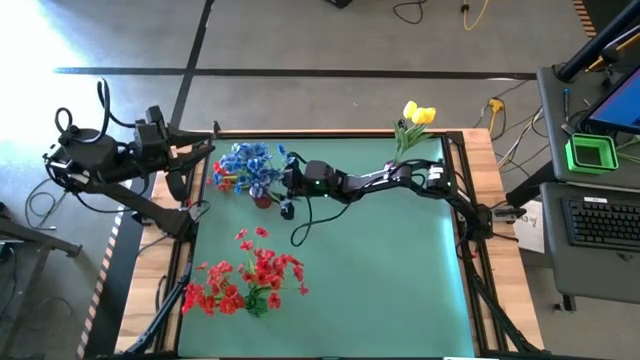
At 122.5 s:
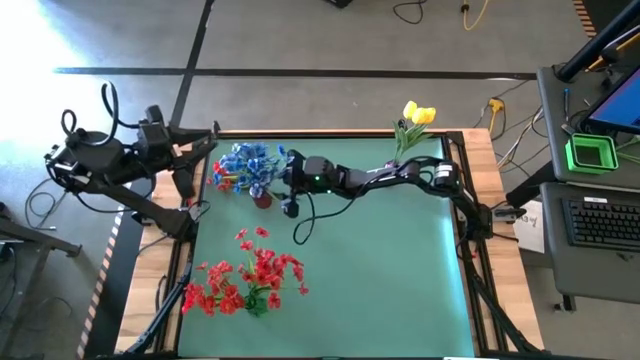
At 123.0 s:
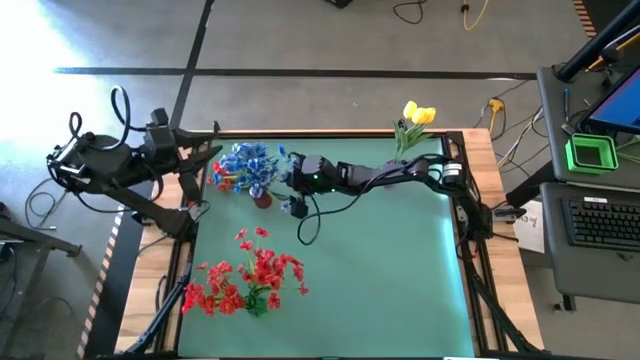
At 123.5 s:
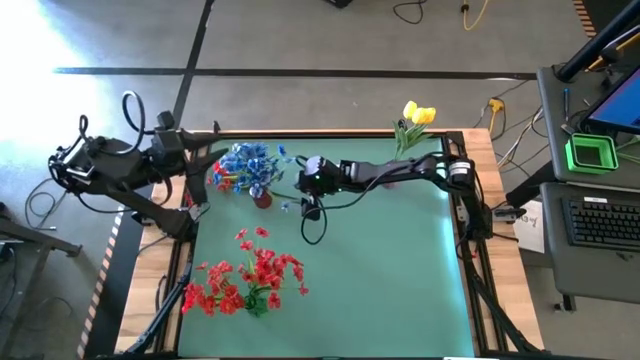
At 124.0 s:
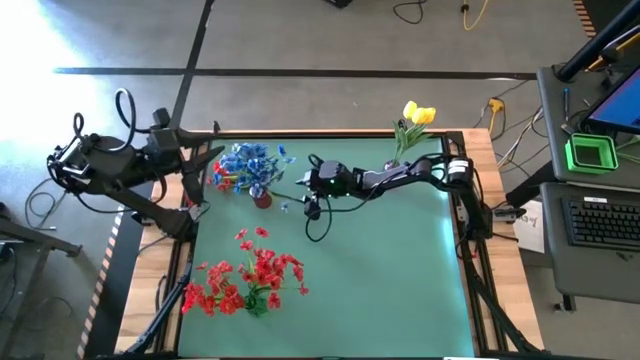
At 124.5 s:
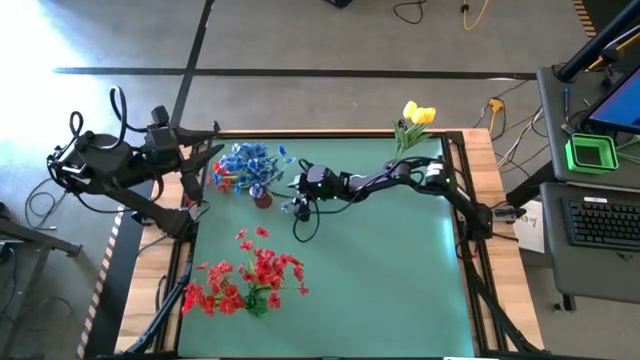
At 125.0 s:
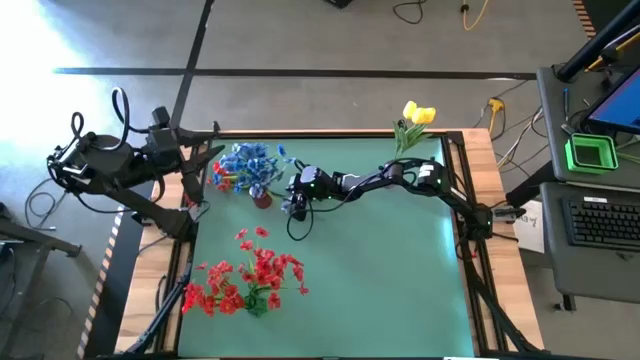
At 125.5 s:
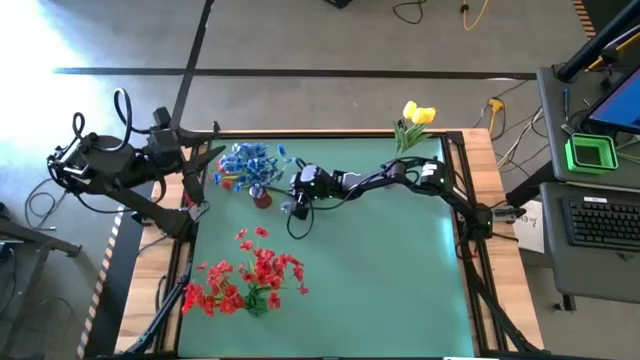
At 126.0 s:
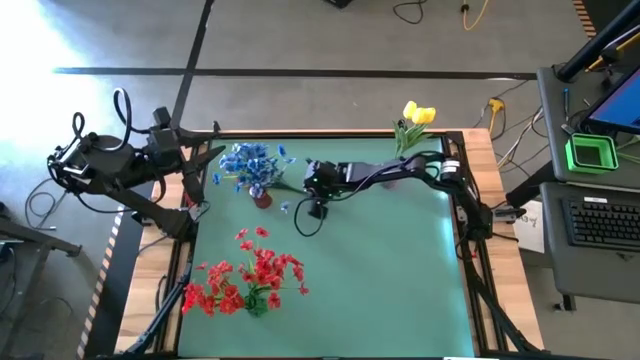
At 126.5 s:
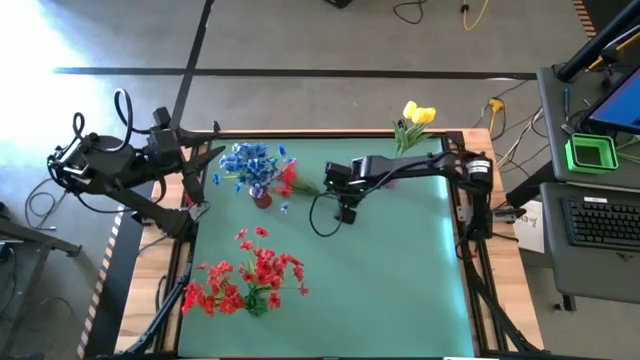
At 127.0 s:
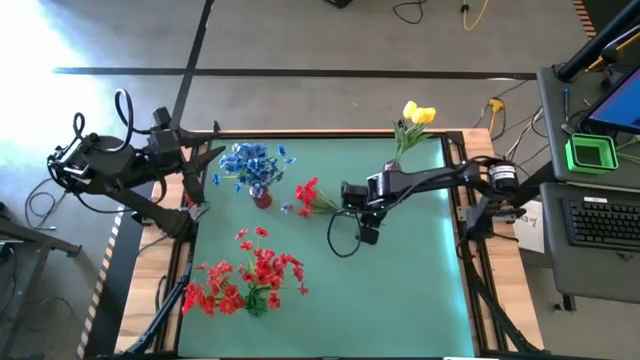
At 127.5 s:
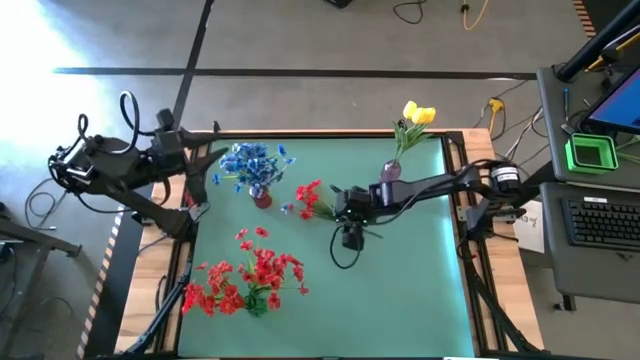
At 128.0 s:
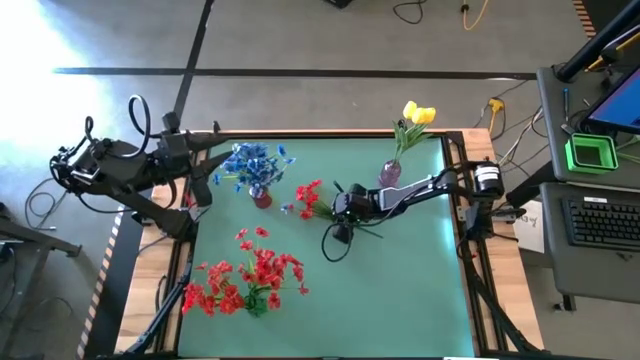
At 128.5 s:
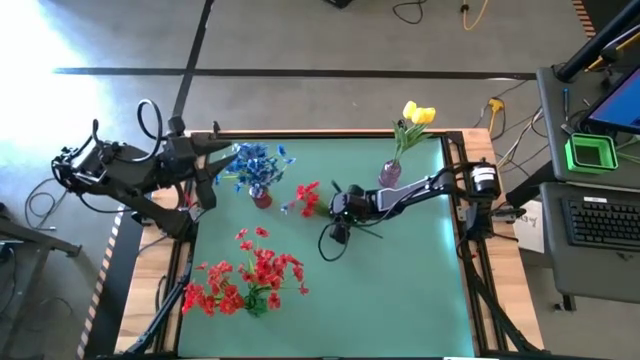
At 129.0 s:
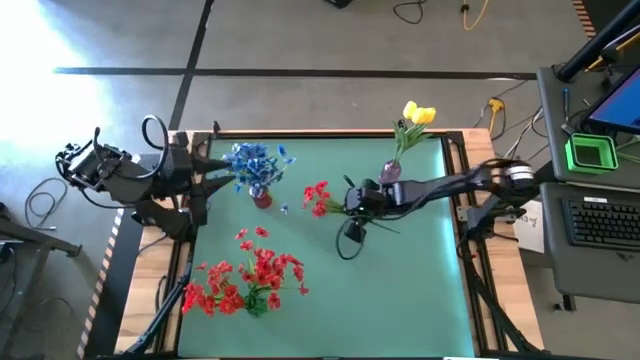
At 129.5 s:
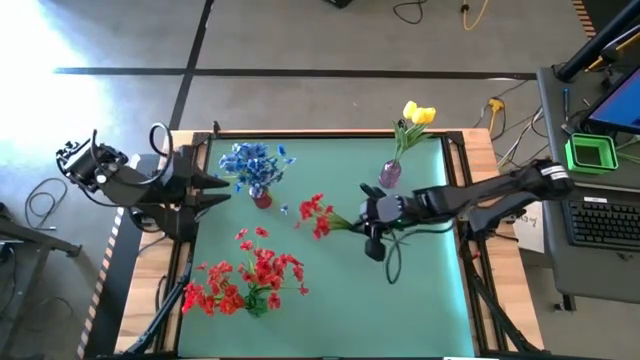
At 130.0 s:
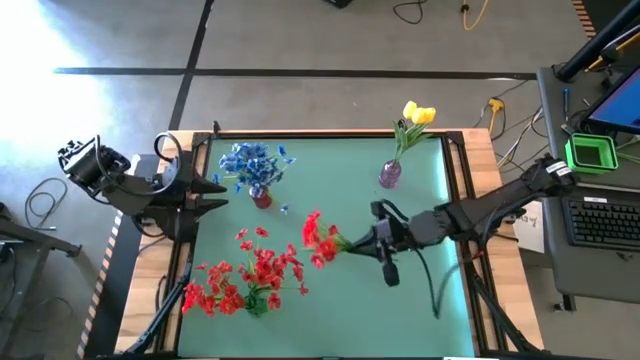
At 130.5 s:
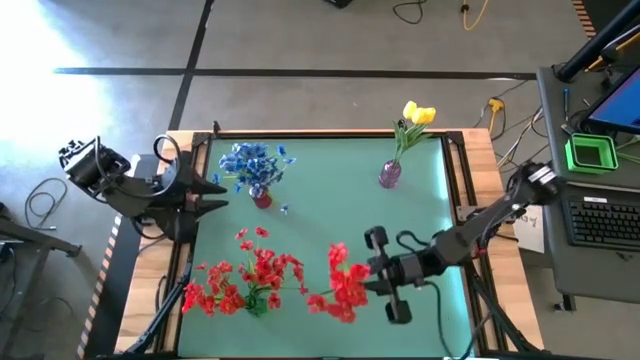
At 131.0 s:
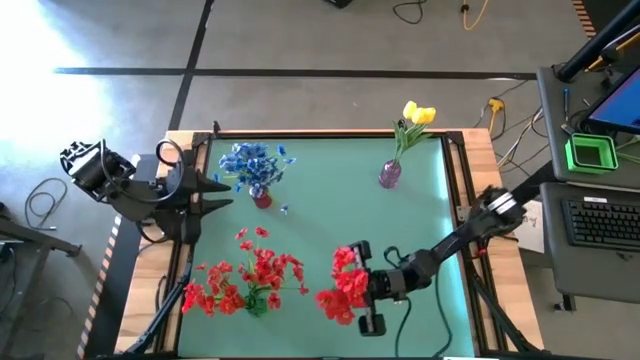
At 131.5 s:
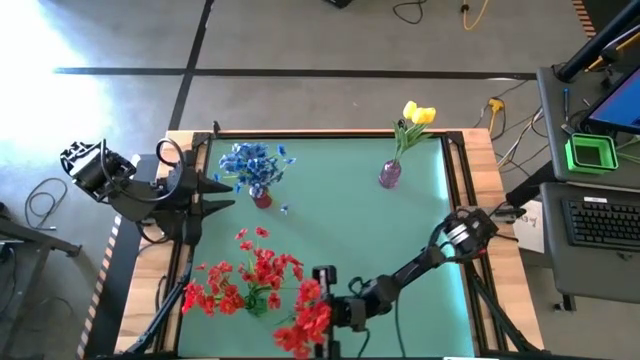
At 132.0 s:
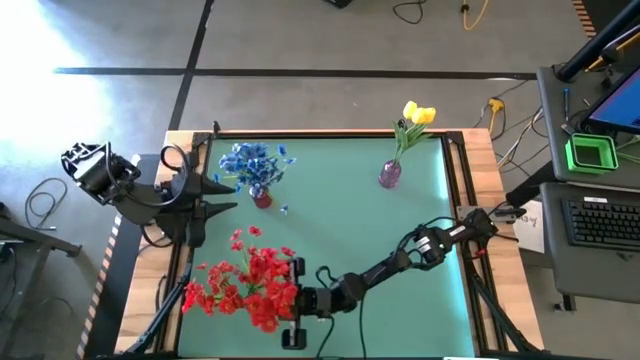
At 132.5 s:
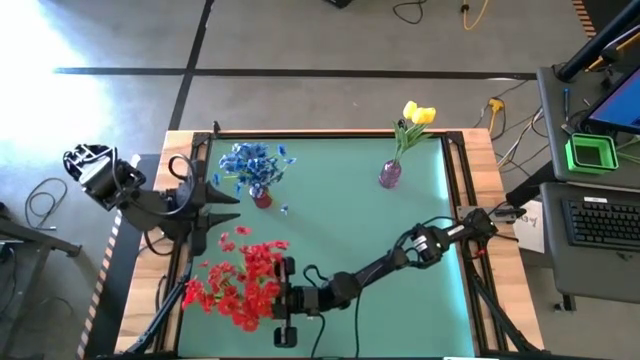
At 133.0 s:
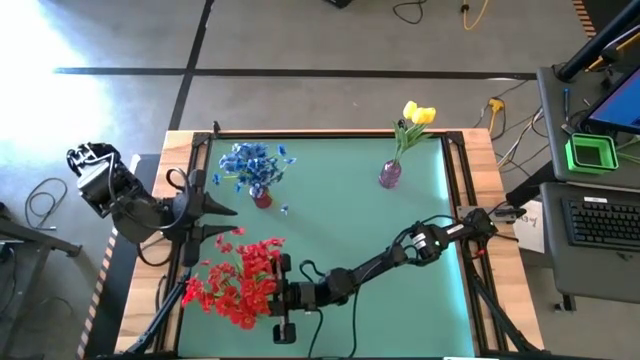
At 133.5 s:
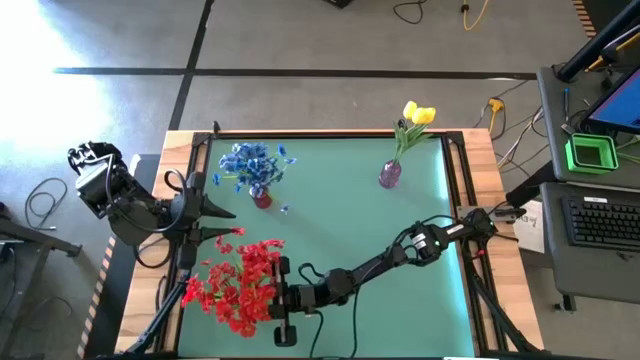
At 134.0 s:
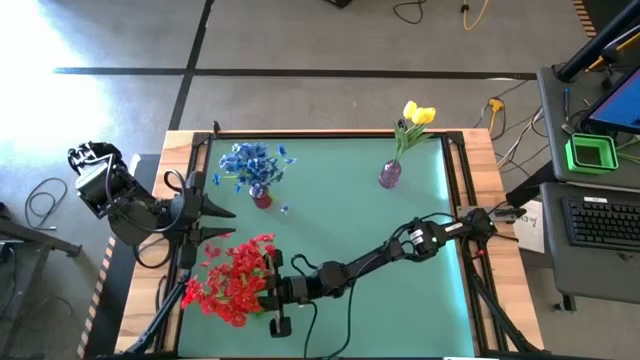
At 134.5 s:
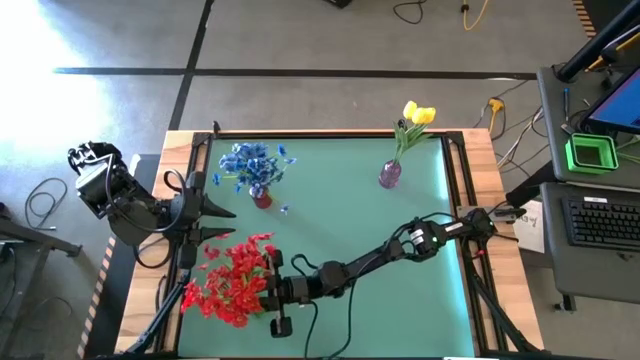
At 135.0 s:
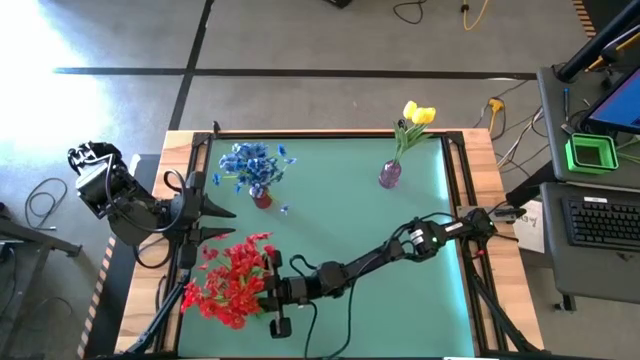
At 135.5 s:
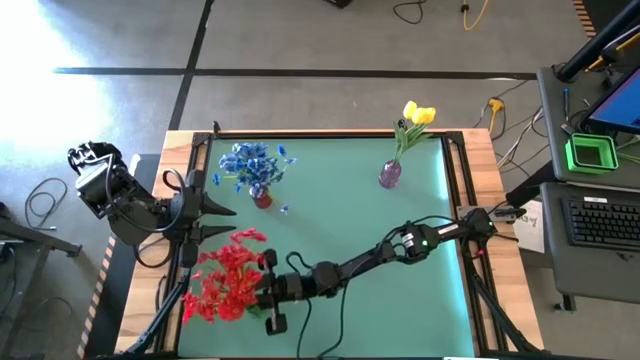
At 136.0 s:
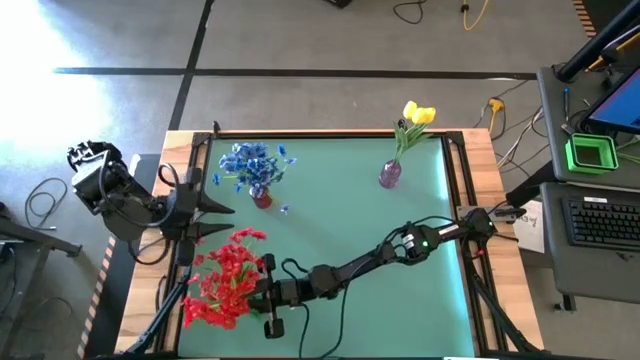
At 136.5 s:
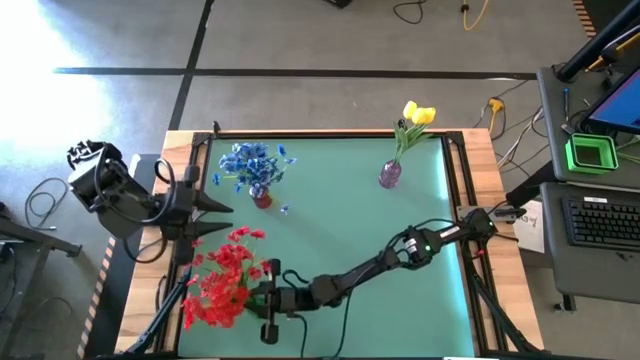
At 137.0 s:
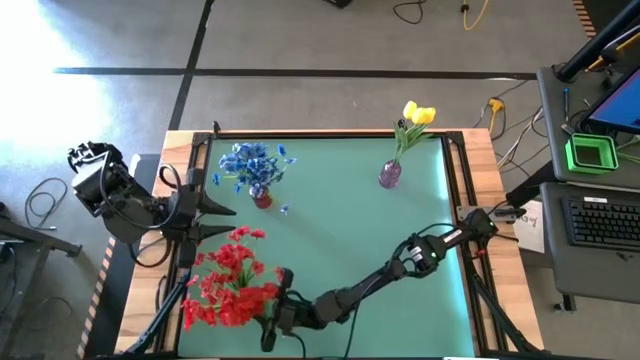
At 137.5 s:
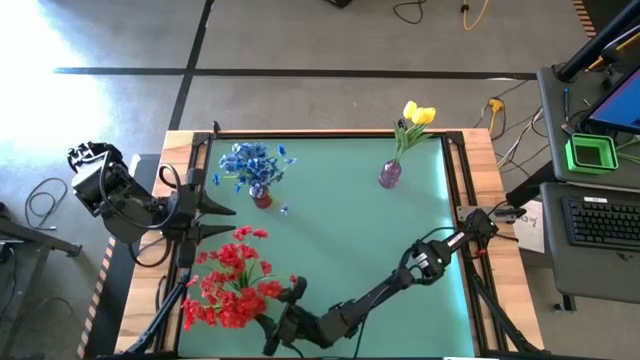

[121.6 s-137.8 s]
Task: Sort flowers into vase by color
Put the red flower into the green vase

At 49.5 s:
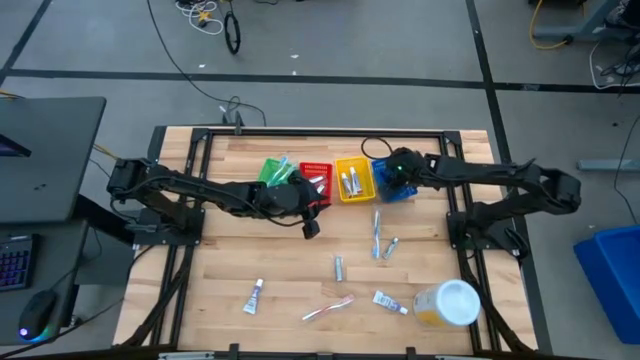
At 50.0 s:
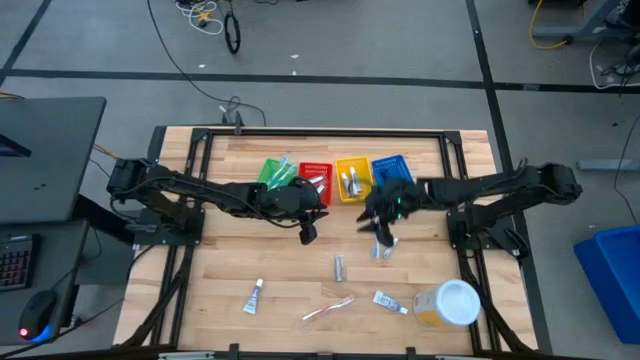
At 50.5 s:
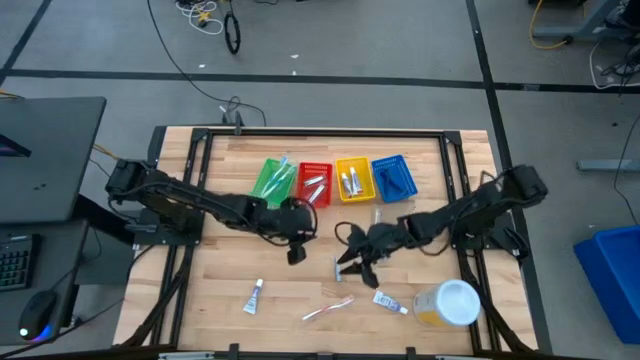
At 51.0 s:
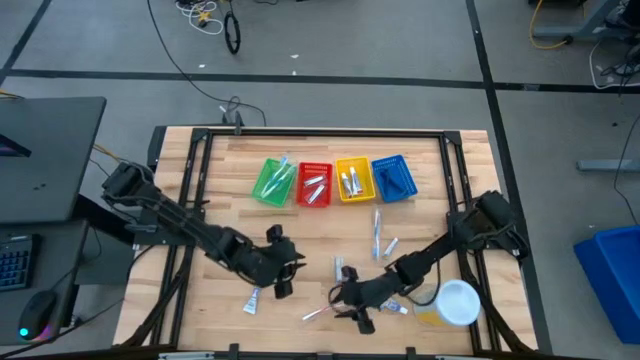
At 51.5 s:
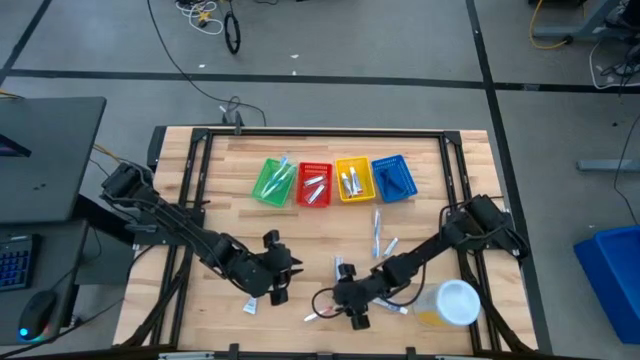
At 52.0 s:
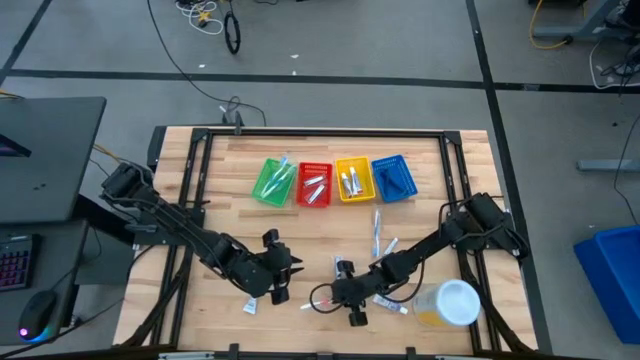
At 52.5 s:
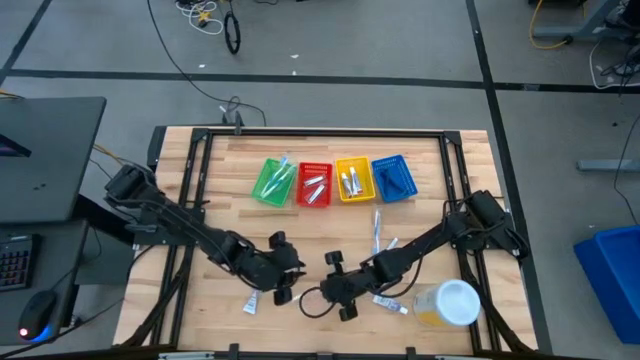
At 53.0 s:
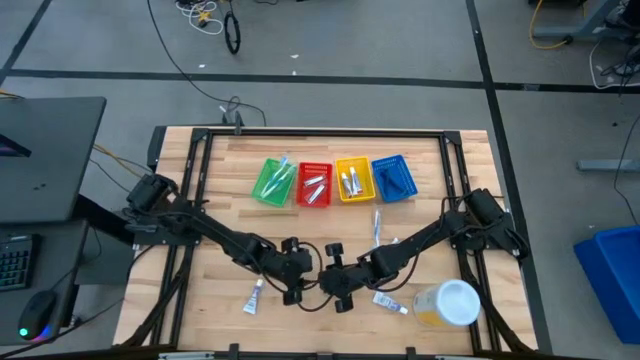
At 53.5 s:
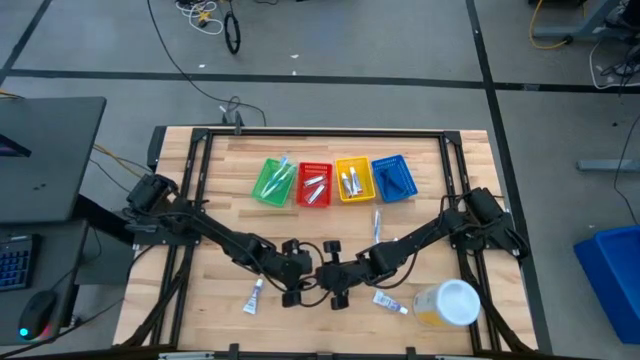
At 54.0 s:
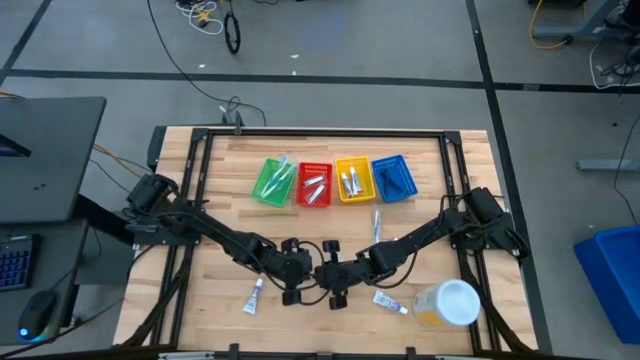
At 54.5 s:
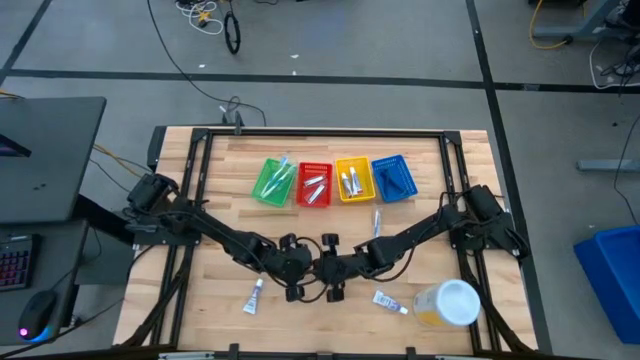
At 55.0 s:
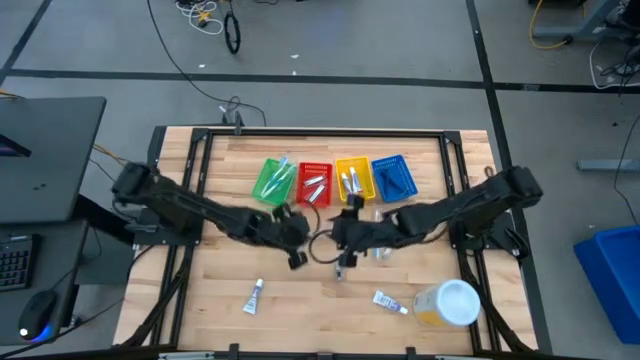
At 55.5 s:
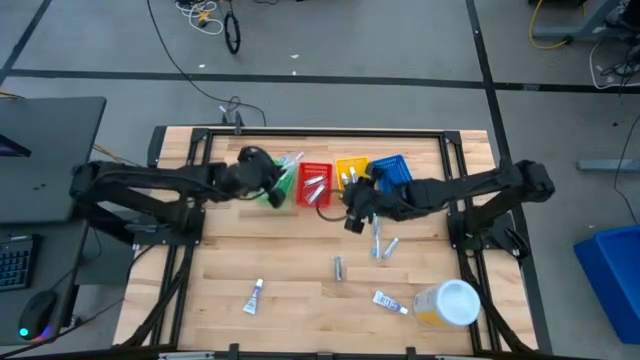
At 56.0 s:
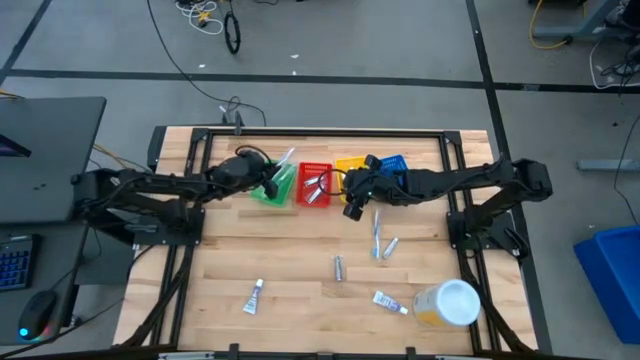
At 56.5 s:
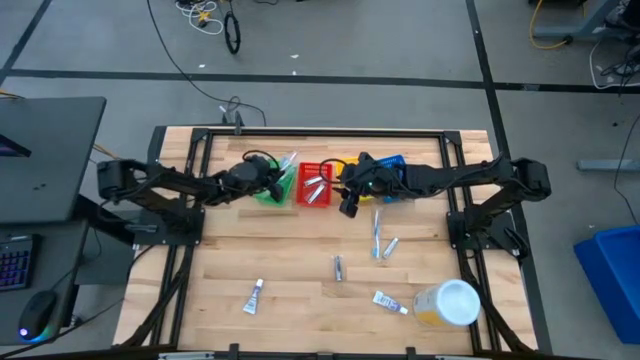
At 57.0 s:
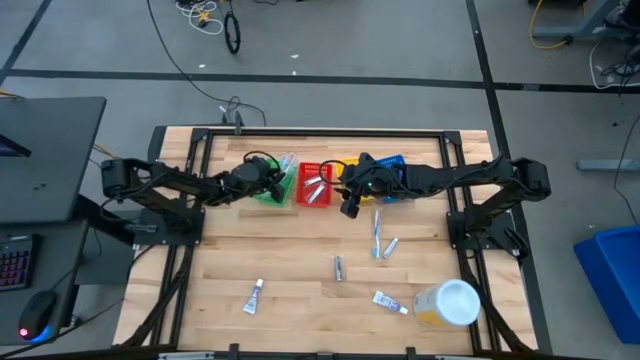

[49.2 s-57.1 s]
Task: Pick & Place Travel size toiletries
Put the orange toothbrush into the green bin
